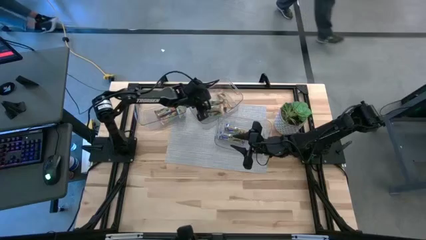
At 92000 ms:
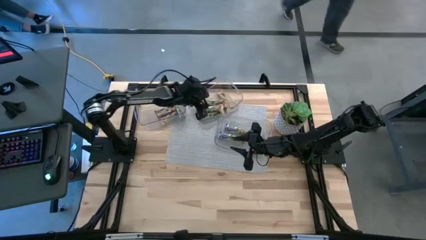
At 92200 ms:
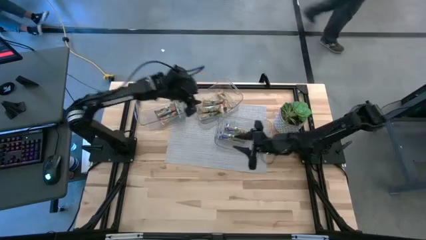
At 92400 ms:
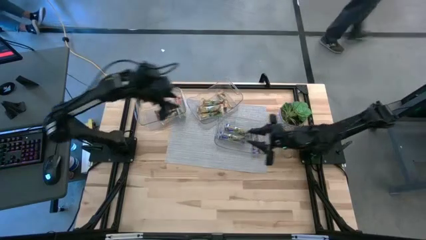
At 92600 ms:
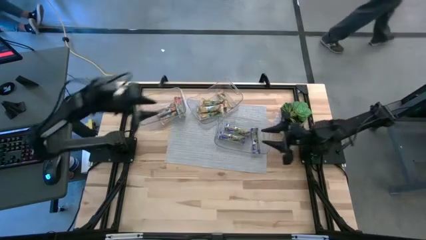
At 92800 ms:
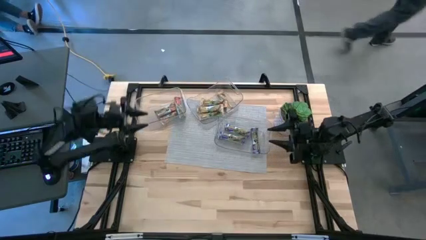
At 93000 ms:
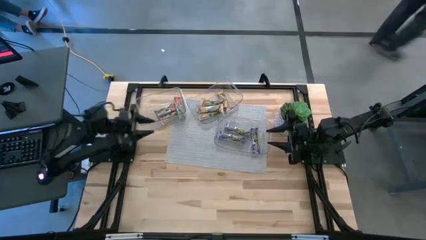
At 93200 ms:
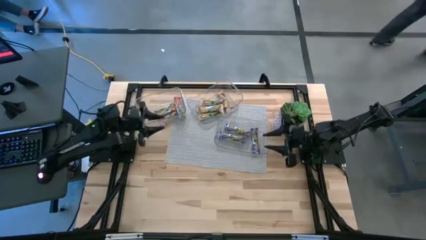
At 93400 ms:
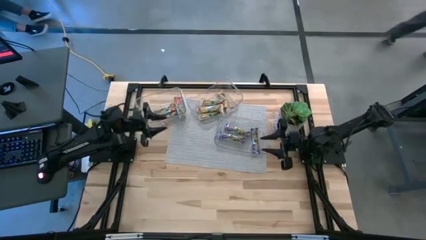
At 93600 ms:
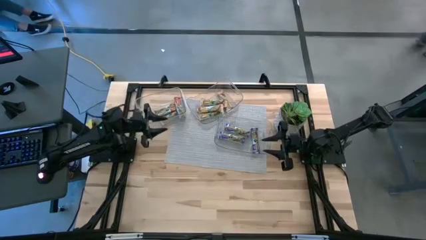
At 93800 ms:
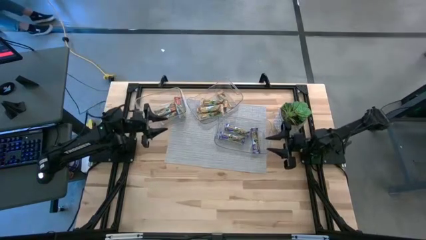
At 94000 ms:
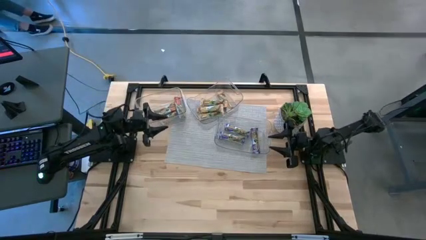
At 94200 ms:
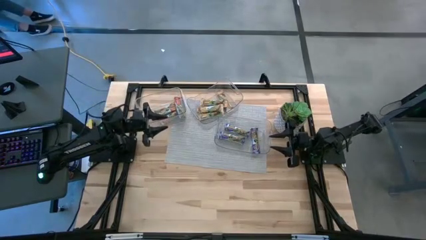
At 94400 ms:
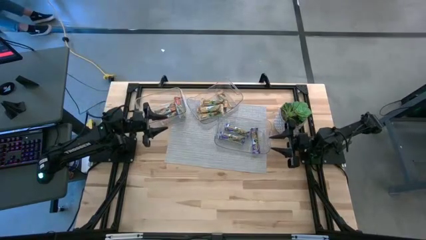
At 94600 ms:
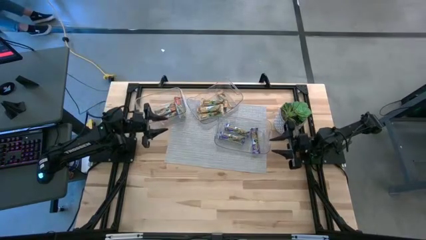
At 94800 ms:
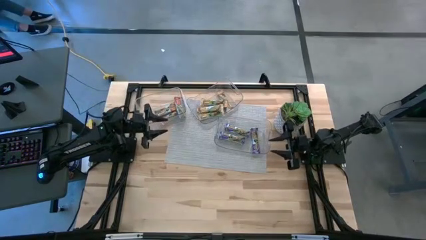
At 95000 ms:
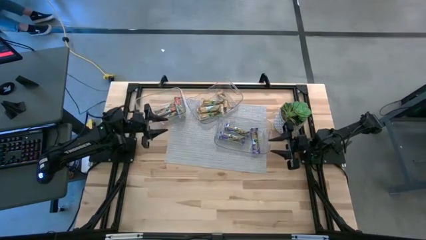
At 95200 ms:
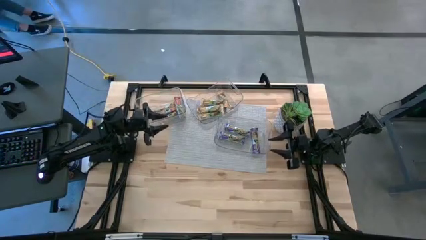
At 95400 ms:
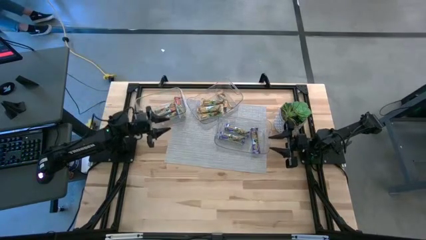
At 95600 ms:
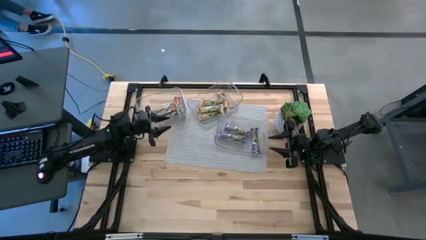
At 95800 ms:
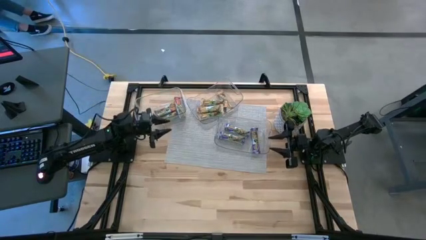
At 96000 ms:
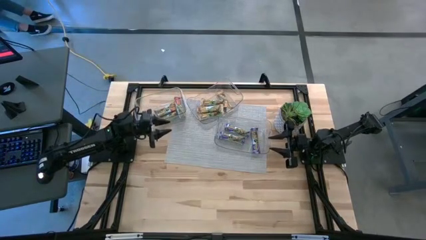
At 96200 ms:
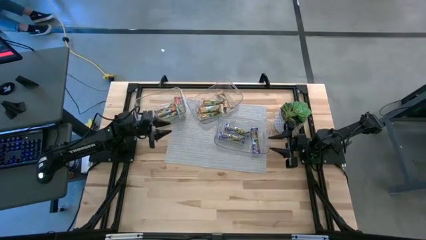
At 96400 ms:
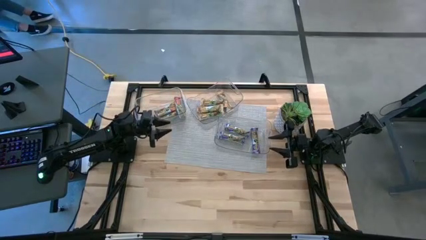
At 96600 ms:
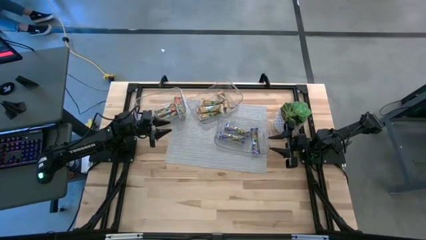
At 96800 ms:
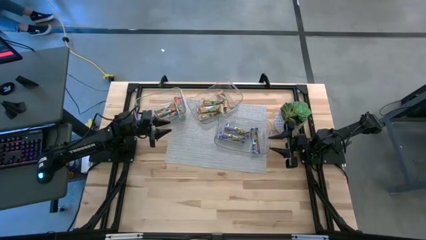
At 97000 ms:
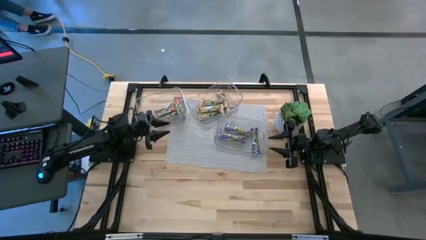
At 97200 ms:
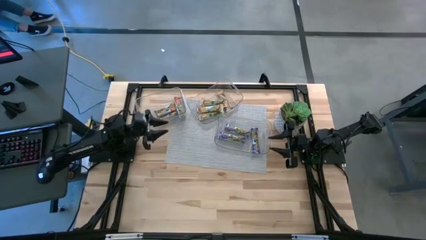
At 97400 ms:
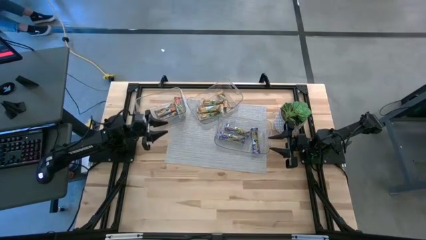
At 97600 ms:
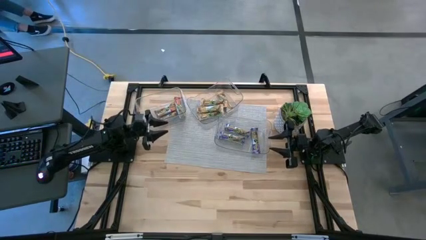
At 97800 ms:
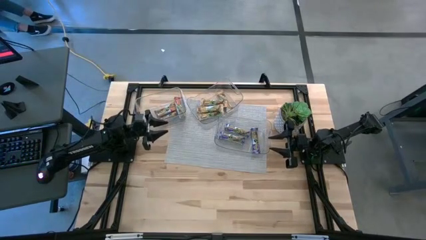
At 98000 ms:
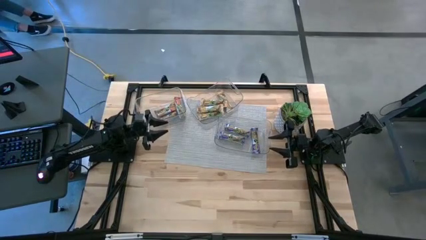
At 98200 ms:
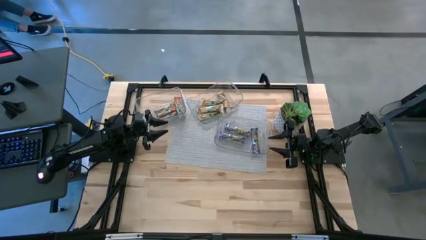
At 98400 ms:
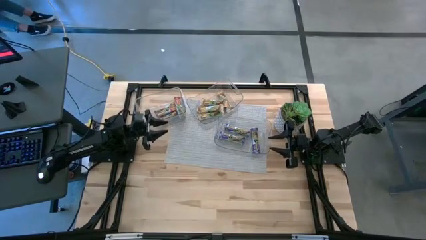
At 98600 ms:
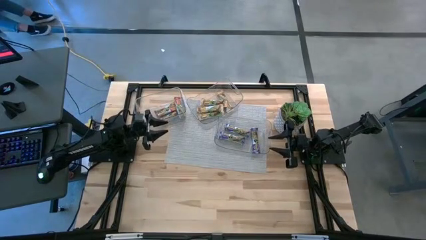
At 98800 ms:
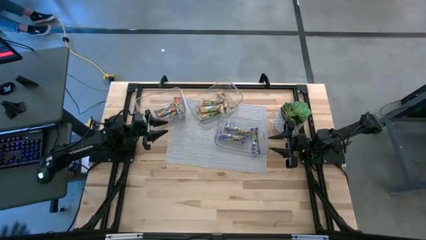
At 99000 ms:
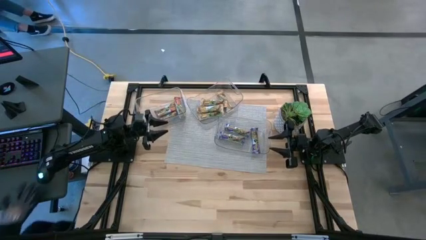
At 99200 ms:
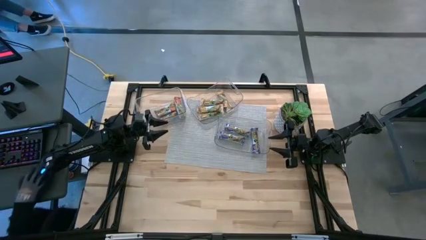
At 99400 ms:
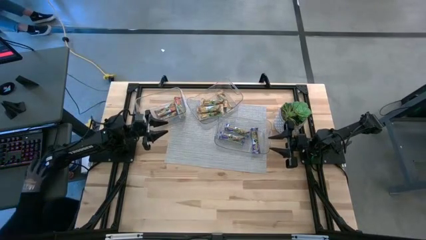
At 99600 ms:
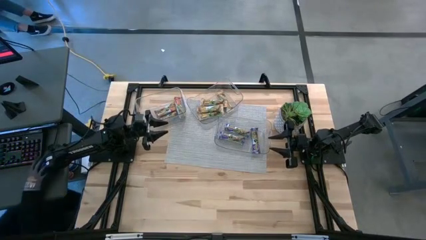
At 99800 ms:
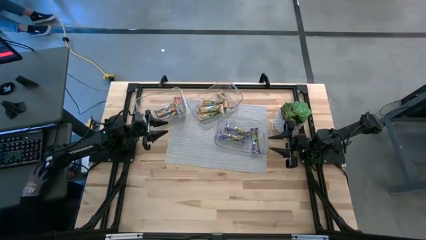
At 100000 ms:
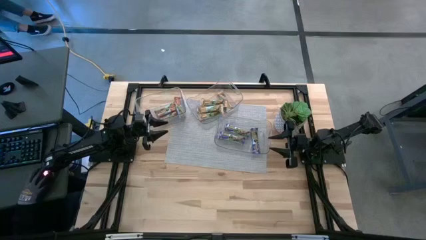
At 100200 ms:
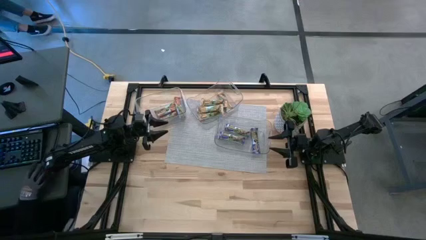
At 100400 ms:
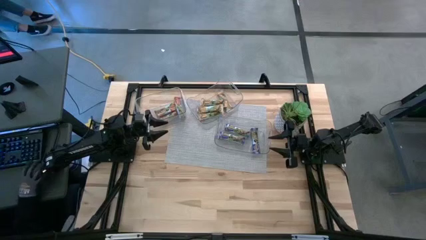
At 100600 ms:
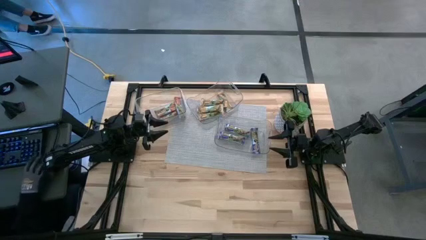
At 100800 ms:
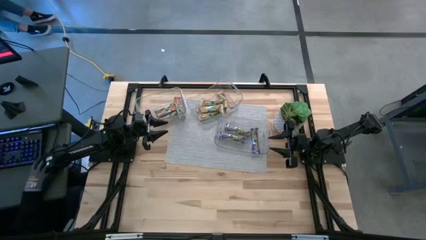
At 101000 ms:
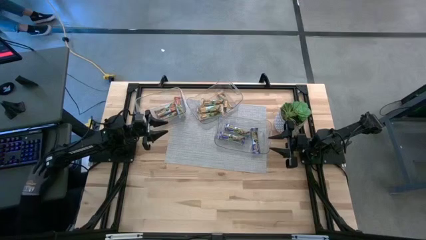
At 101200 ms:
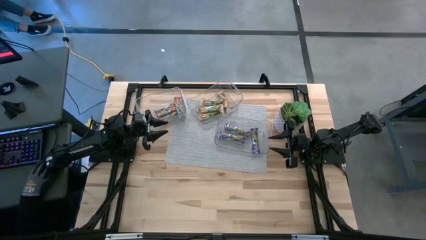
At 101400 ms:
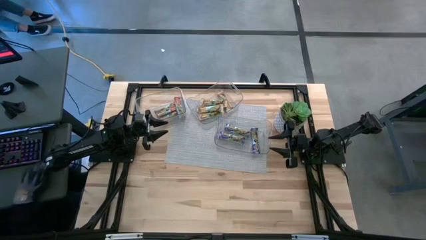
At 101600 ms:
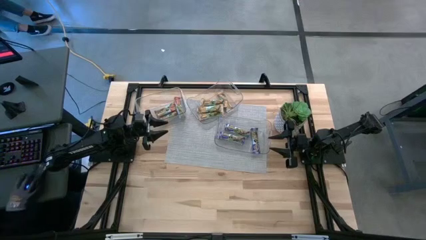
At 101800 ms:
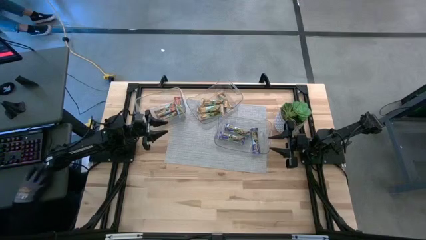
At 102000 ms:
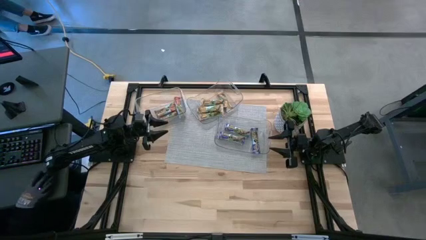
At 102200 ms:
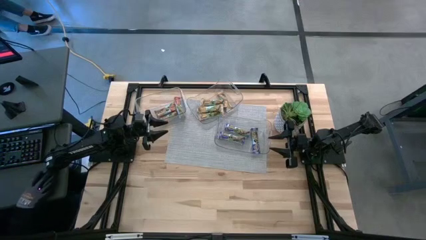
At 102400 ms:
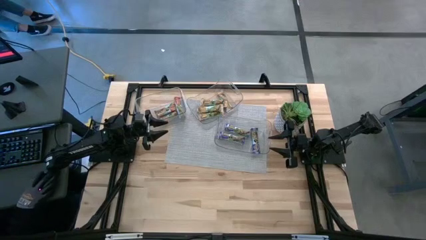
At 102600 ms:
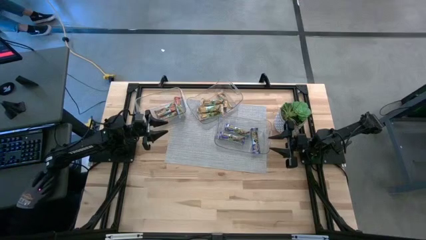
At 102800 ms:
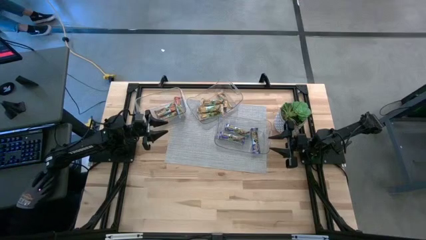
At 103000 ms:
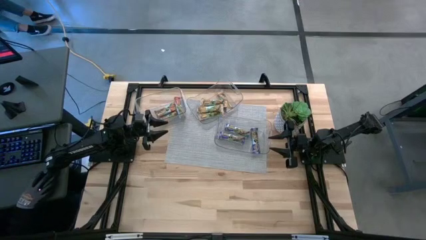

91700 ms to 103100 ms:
Task: Pick and place Granola Bars by type
Return to Home Position

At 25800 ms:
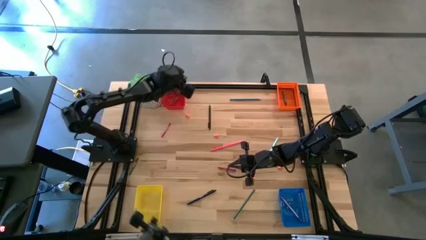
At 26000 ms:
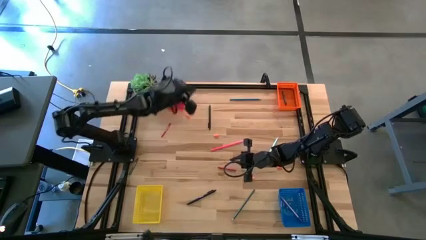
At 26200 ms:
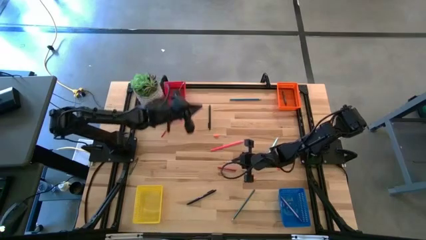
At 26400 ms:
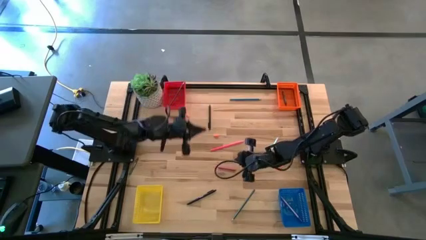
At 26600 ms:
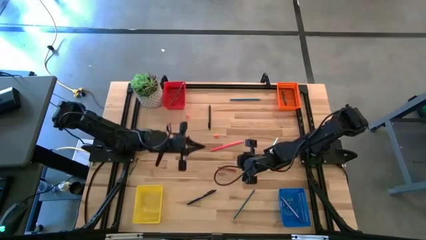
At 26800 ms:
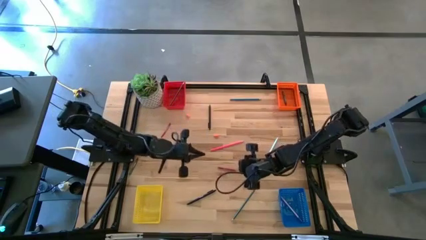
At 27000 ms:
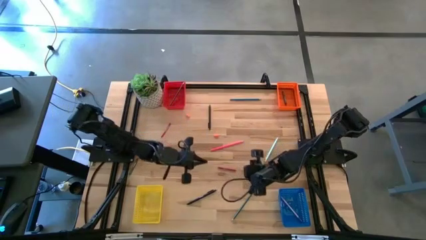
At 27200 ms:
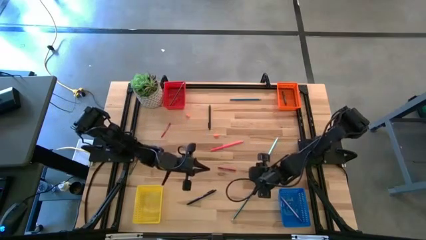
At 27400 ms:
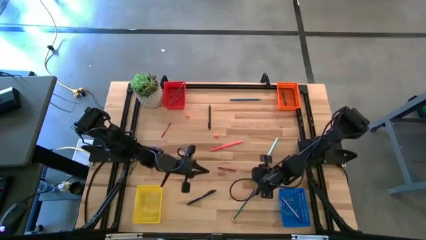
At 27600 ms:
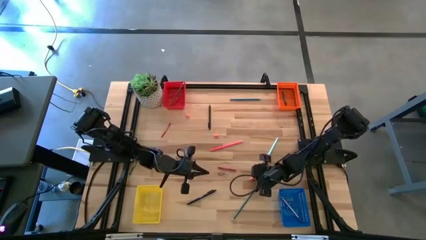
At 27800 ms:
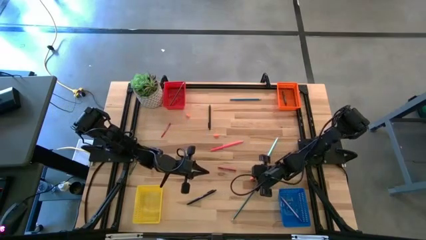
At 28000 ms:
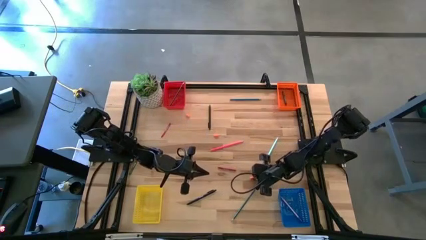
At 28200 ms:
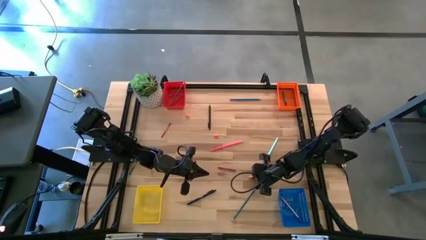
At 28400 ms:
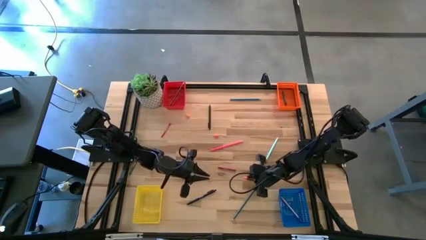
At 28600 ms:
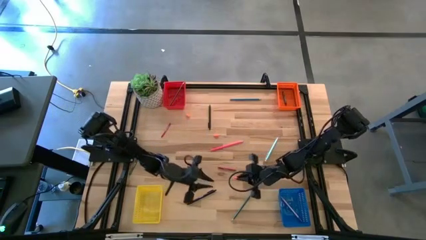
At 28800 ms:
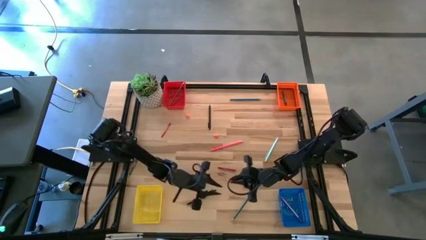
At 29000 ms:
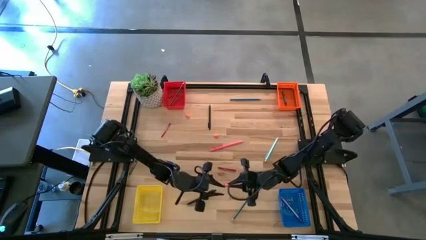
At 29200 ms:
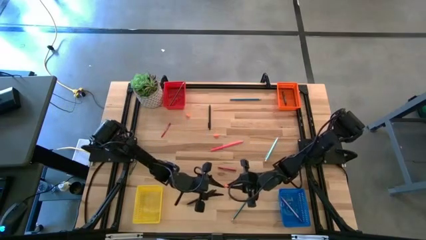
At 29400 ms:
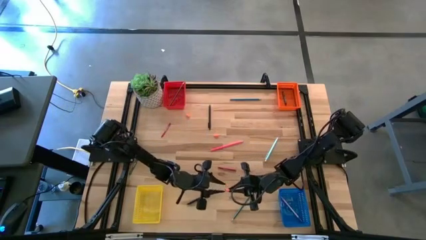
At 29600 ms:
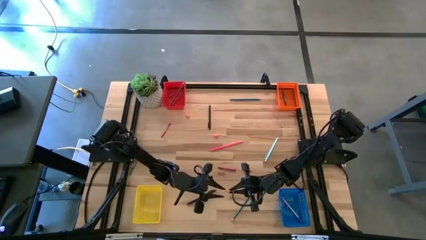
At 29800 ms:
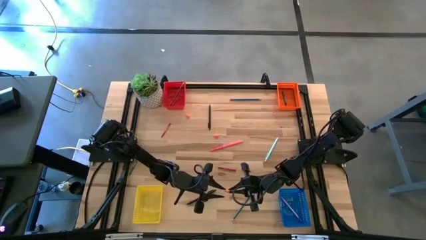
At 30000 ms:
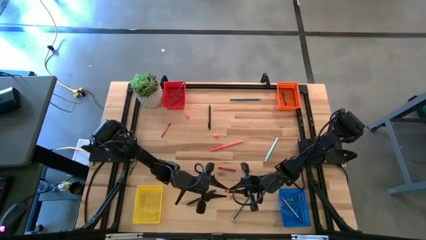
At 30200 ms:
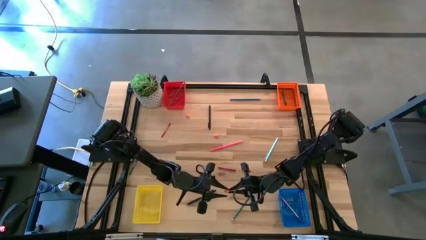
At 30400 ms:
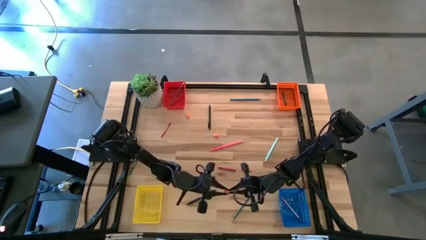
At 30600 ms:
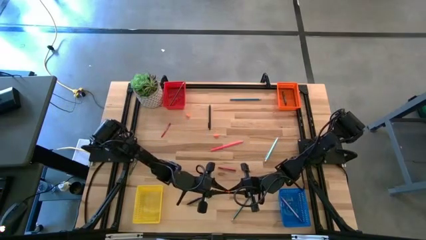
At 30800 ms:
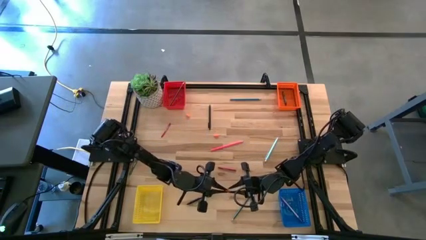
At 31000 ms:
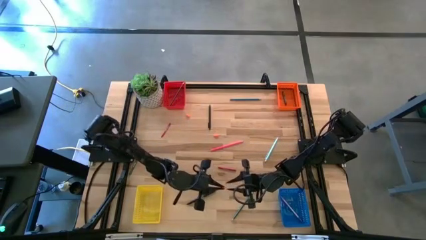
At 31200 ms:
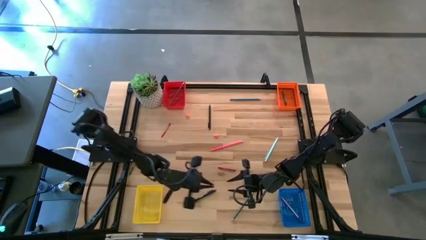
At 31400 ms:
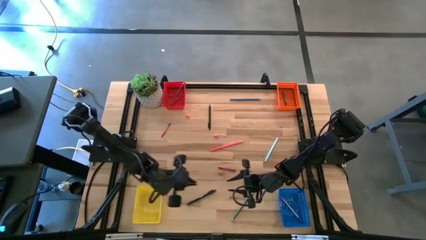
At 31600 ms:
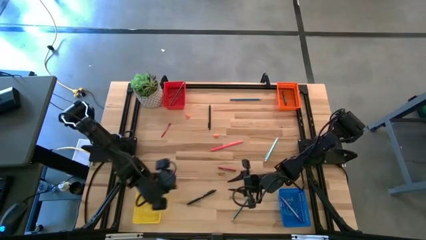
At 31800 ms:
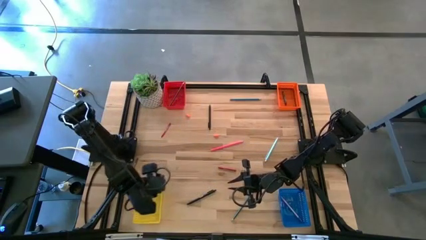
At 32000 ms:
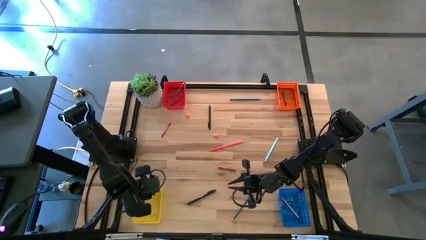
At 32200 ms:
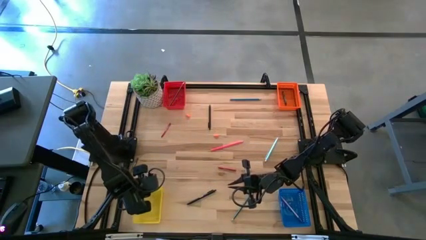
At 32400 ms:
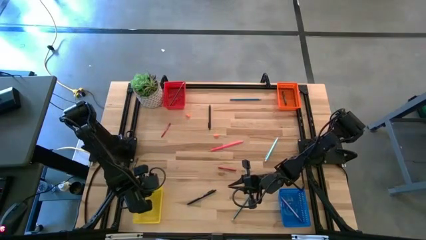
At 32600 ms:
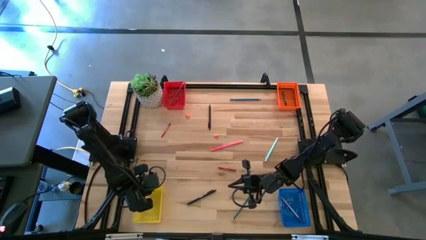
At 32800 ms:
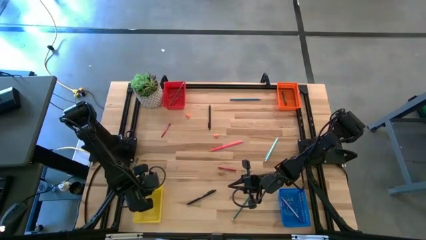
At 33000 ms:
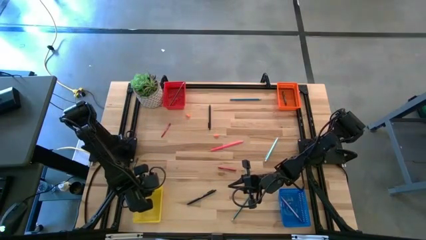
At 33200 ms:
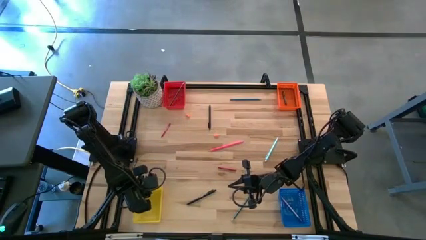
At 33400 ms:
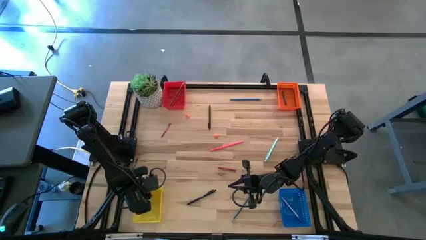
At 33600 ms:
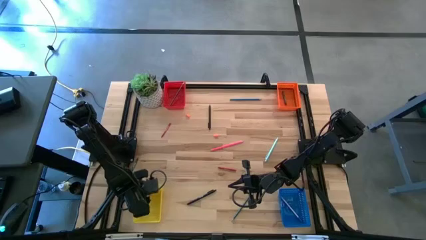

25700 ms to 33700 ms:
Task: Sort crayons/erasers/pens/pencils in bins
Put the orange pencil eraser cap into the yellow bin
